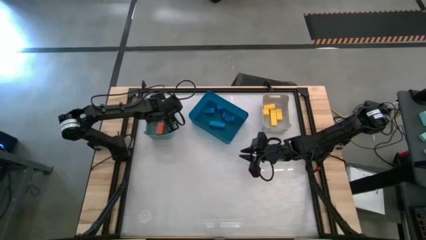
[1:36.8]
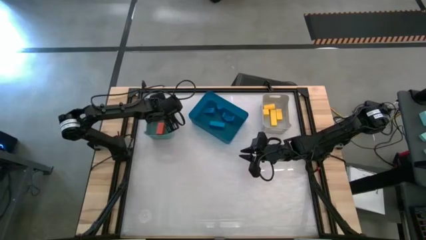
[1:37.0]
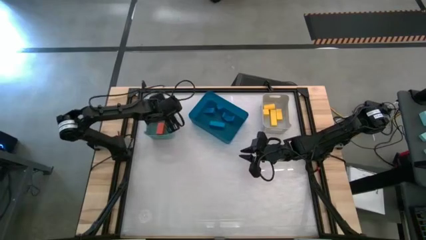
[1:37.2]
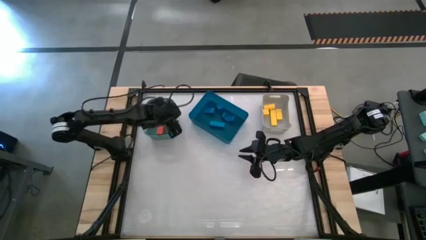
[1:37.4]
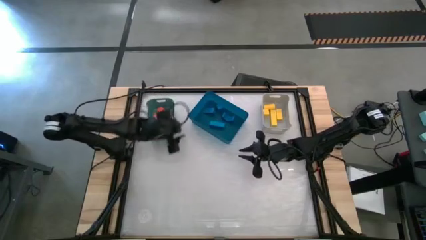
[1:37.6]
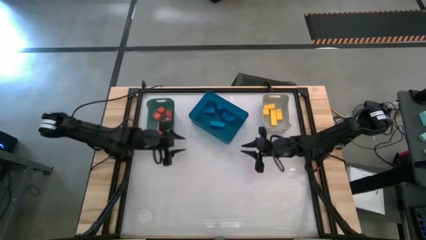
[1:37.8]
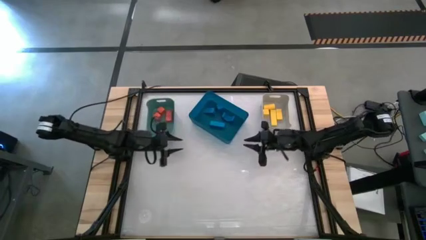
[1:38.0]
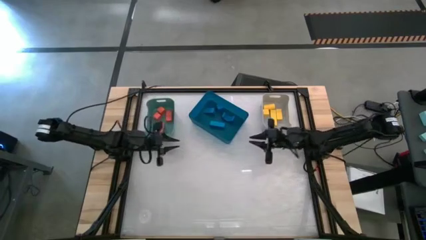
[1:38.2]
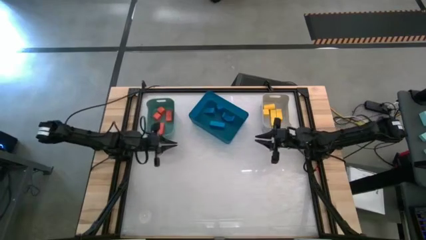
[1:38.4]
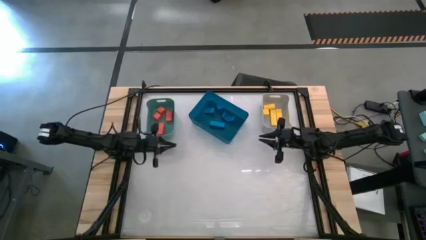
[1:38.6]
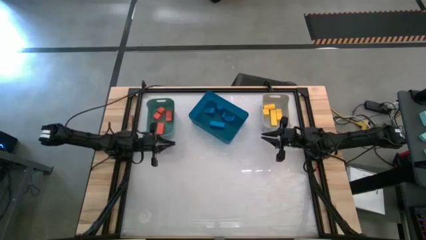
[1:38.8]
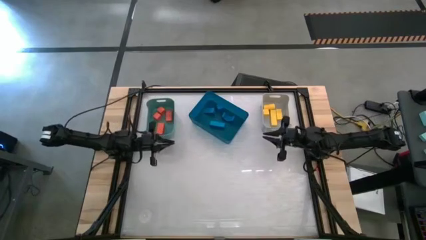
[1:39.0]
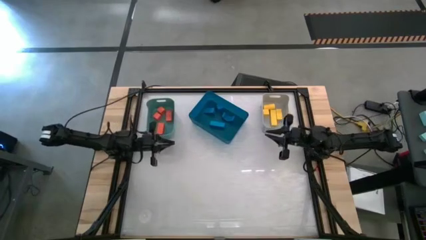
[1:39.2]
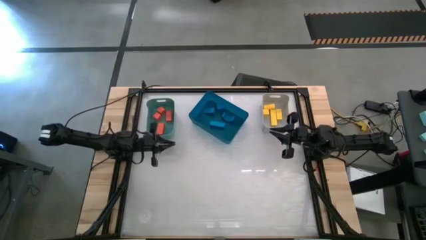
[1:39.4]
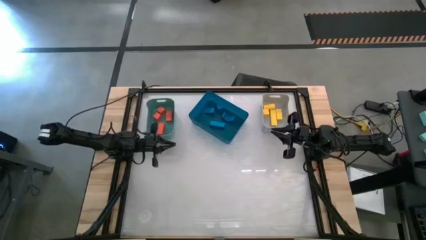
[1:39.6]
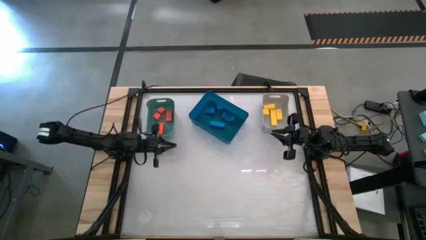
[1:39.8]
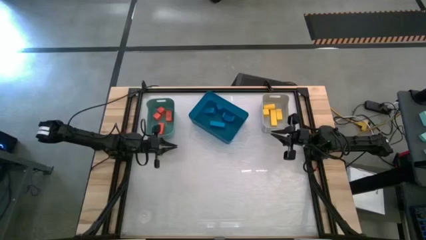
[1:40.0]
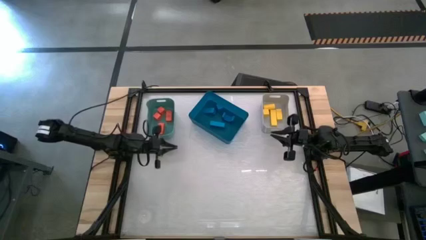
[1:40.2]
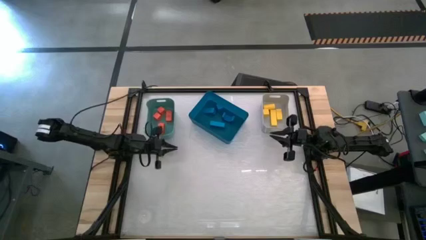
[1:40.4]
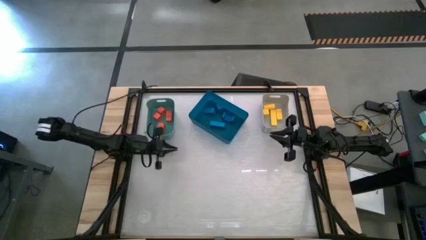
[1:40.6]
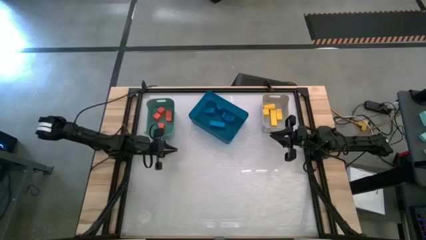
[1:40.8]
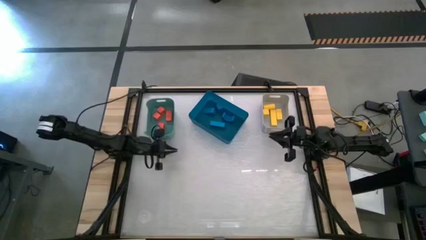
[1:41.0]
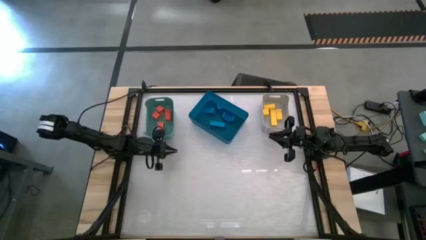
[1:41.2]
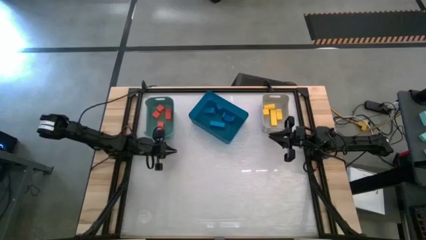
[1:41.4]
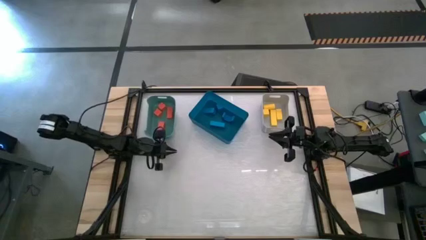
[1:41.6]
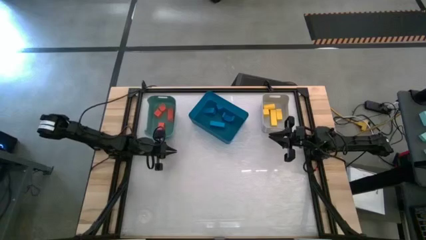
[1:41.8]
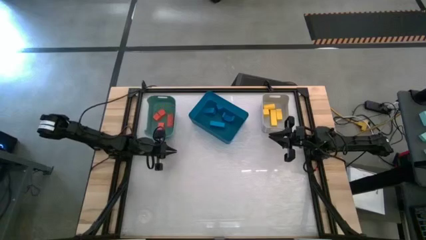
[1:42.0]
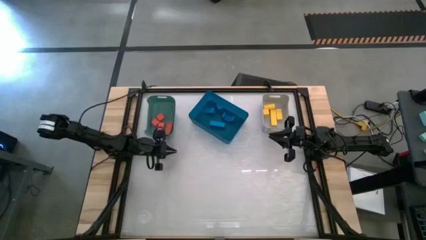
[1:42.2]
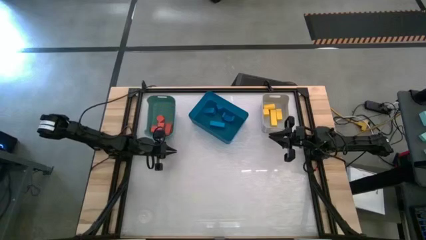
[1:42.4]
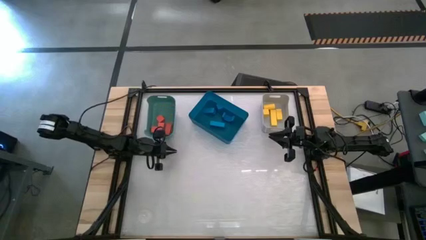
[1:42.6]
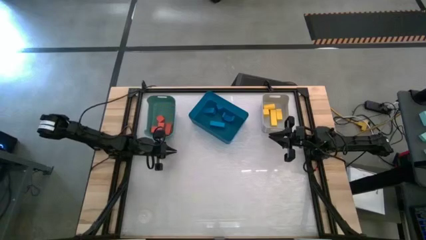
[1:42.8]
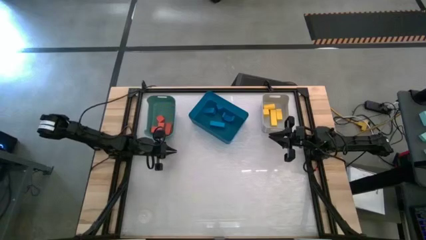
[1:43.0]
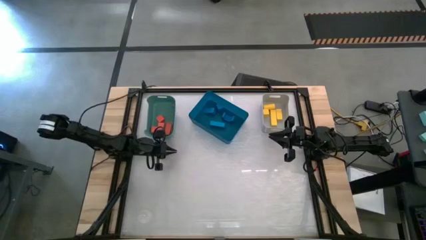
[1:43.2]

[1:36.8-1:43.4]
Task: Sort & place blocks by color
Return to Home Position

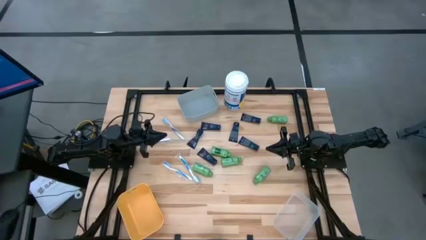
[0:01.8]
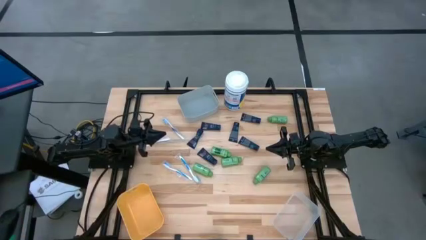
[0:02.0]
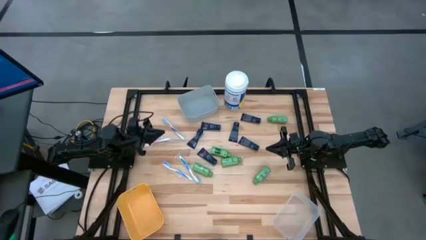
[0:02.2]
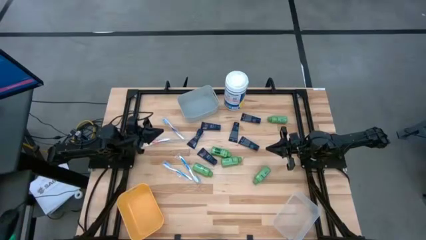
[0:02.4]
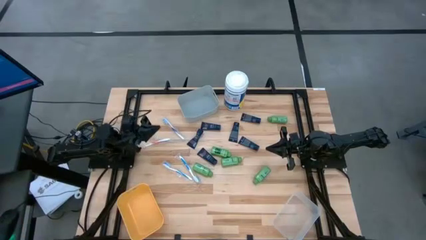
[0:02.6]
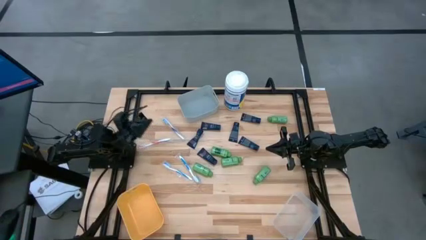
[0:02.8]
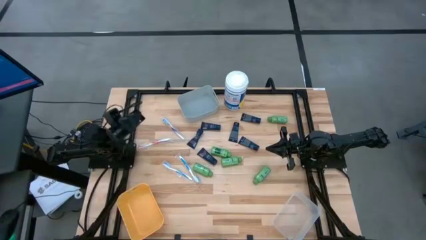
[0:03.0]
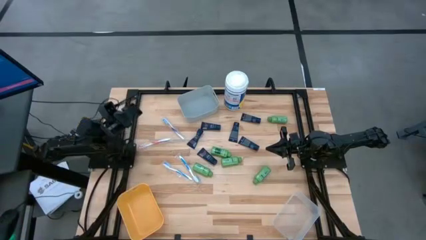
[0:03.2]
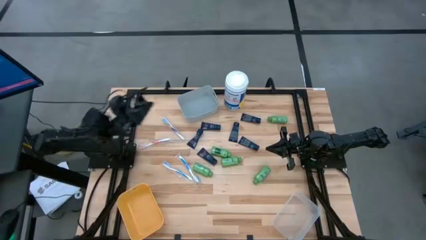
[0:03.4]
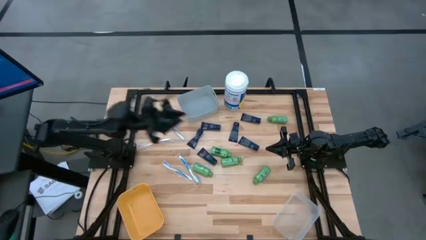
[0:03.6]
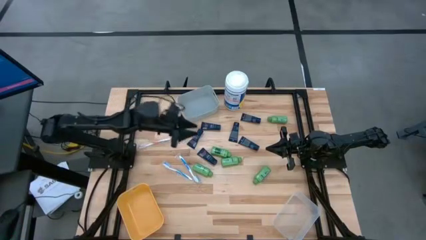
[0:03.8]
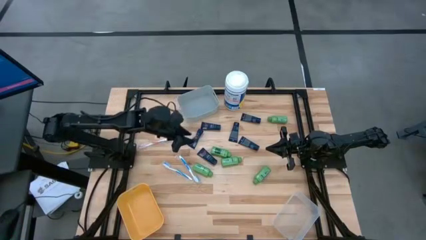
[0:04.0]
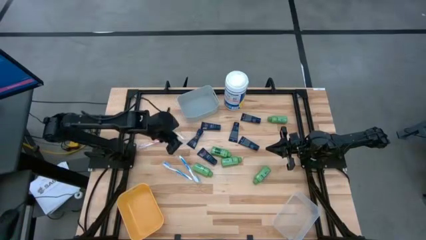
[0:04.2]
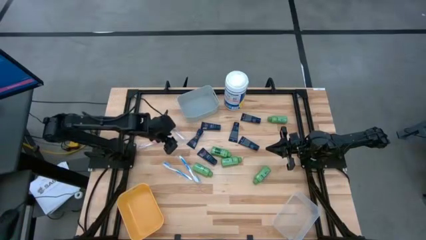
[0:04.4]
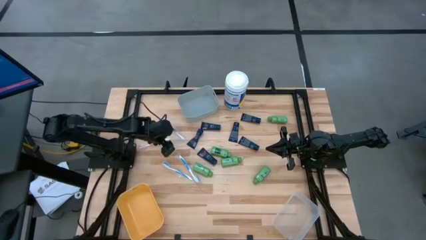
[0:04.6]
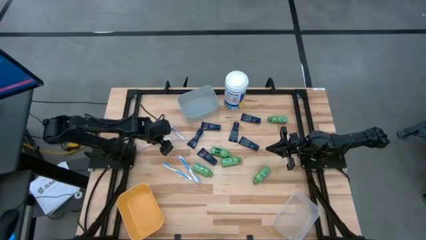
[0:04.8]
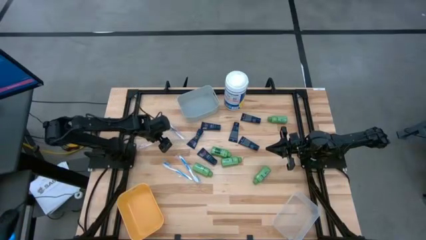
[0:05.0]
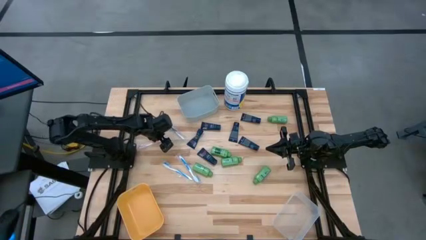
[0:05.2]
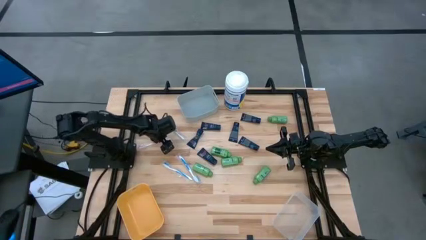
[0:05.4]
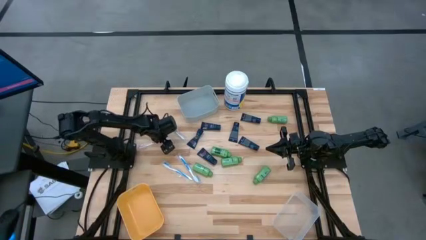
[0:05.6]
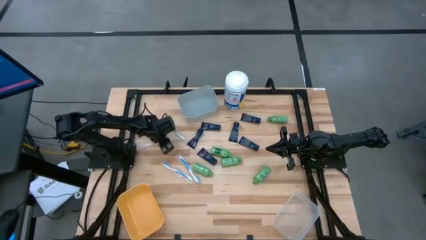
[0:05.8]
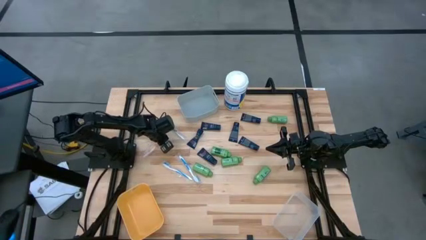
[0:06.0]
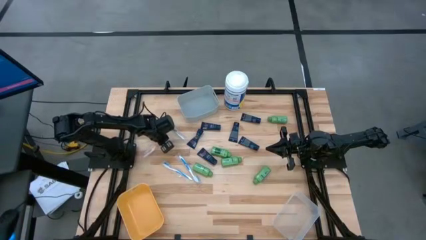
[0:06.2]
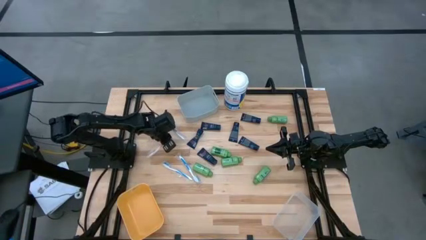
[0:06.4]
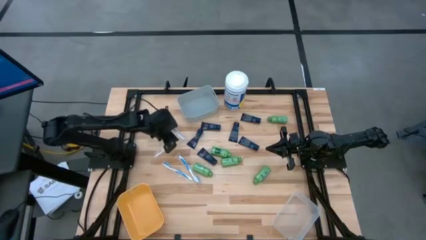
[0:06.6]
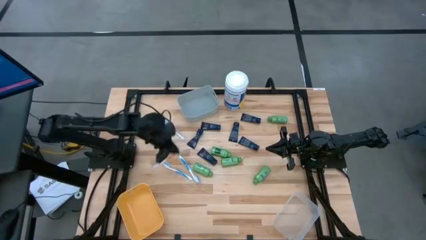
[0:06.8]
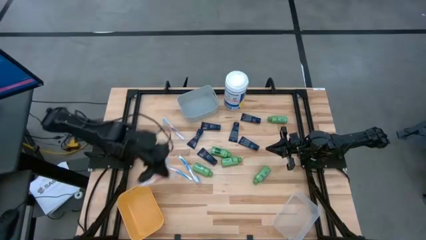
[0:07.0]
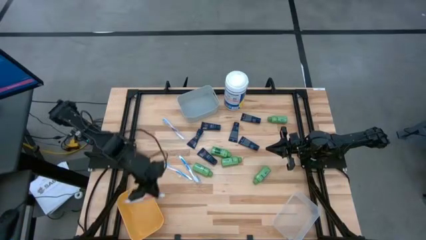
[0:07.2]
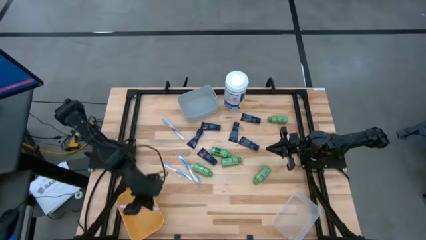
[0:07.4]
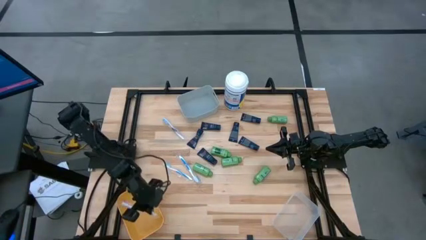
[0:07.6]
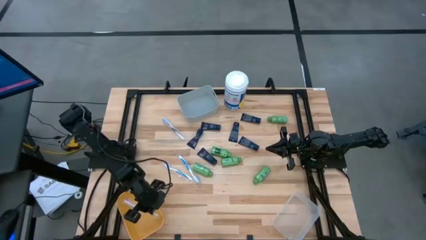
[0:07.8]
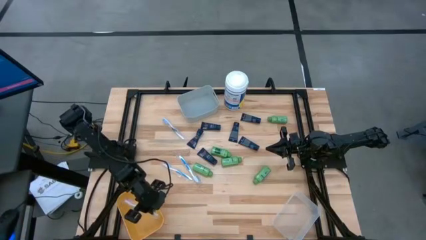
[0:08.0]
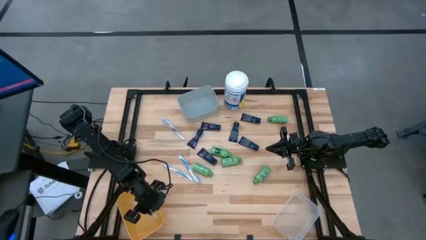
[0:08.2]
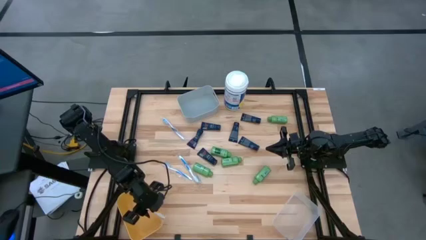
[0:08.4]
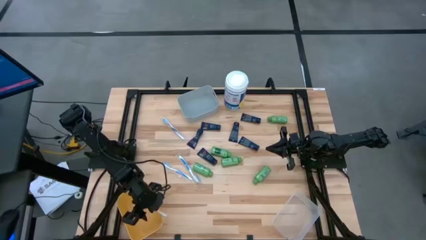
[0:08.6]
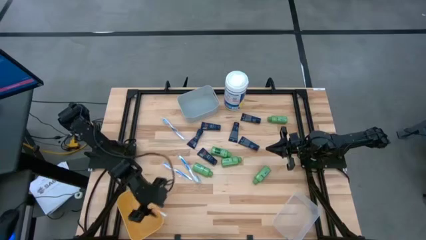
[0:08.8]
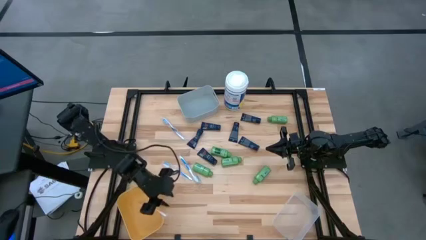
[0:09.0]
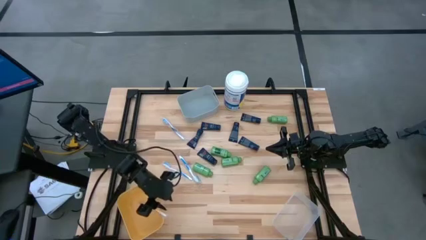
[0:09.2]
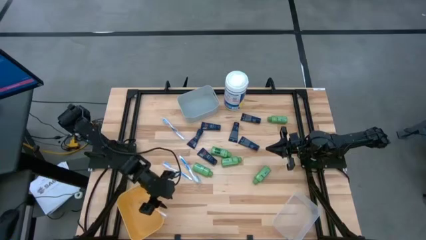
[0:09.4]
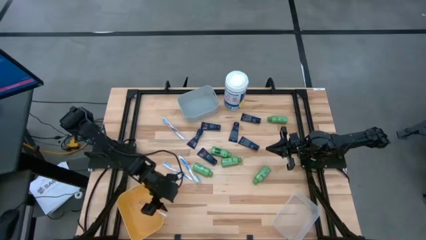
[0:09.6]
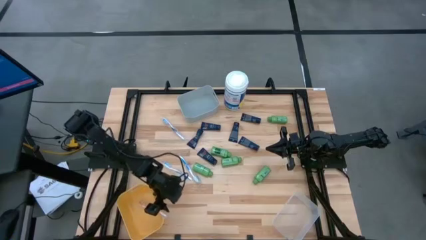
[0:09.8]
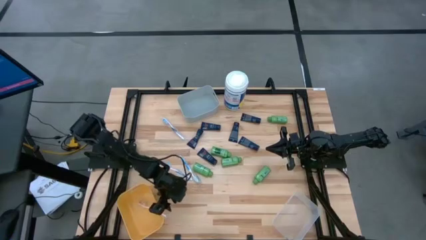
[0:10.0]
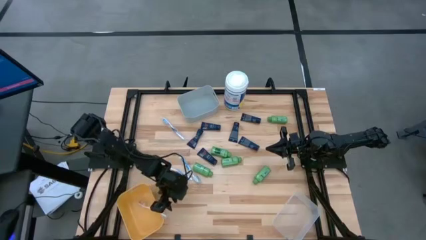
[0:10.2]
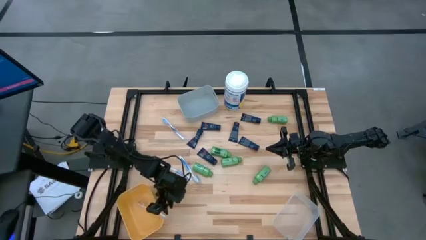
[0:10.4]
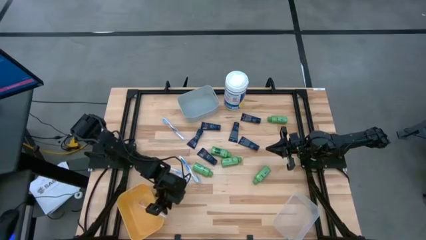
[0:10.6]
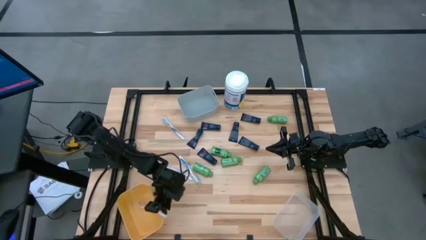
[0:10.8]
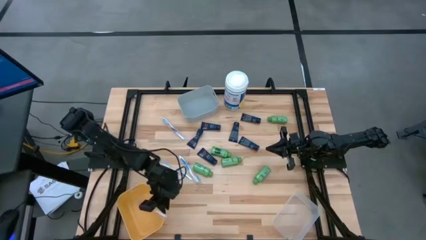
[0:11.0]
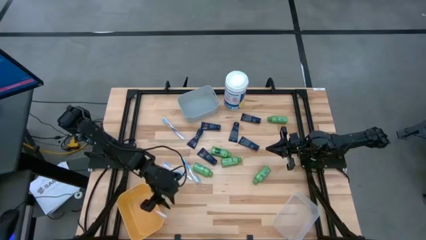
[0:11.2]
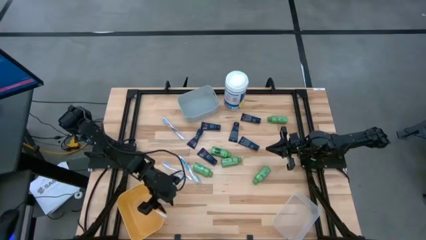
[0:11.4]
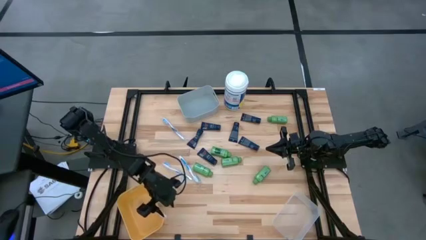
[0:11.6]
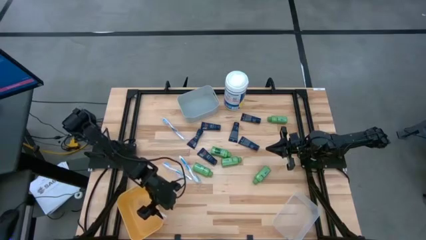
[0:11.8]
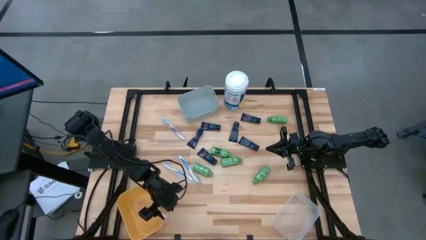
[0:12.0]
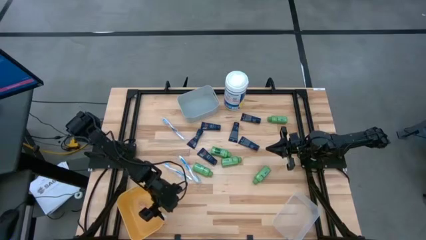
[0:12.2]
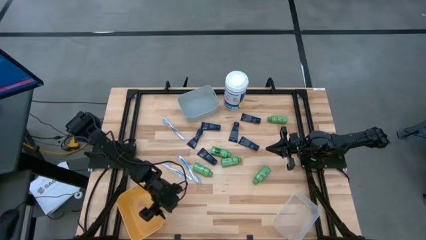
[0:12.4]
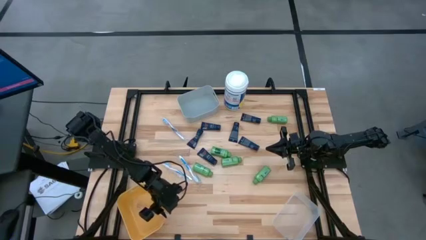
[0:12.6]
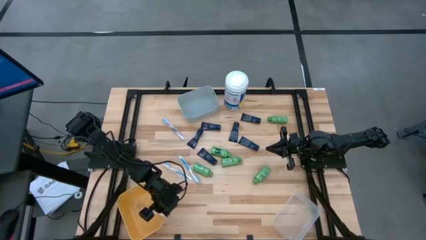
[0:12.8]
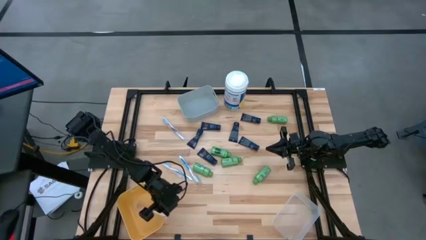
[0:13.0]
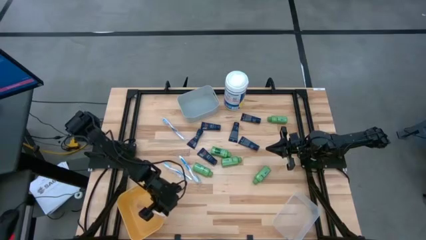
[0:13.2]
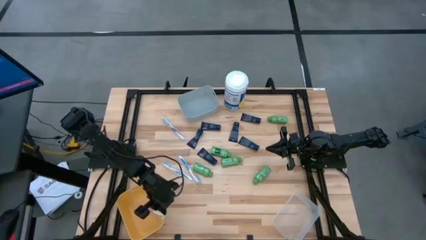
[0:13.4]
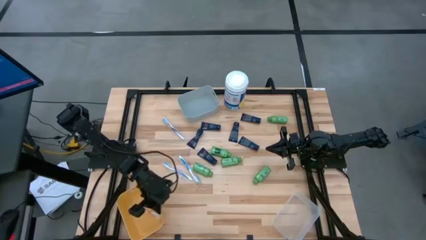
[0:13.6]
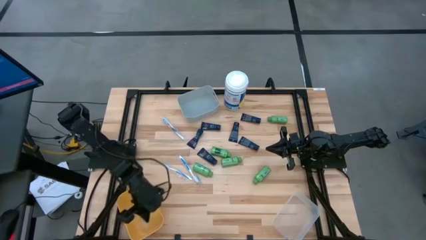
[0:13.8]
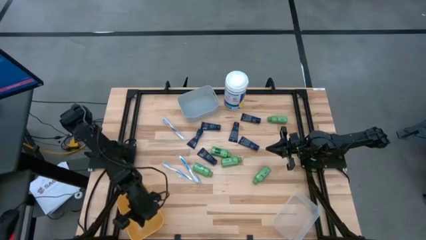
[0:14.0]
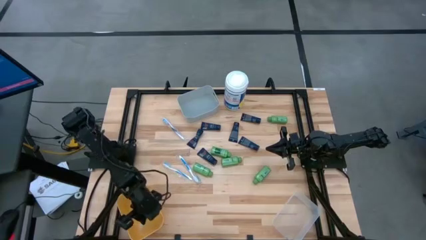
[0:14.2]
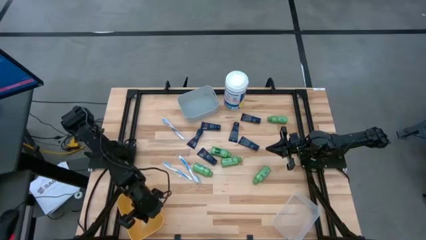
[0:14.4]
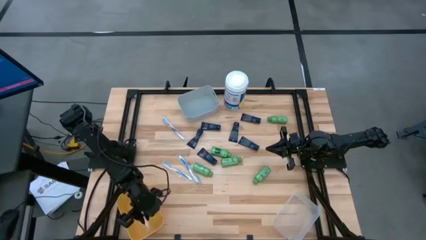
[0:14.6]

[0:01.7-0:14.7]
Task: Pick & Place Travel size toiletries
Put the orange toothbrush into the yellow bin
